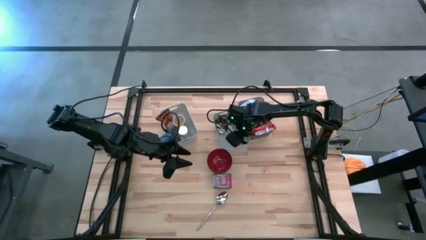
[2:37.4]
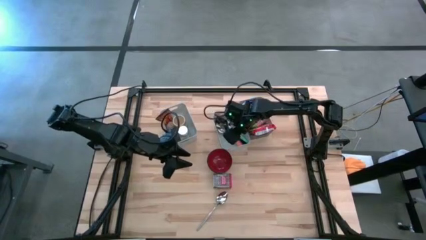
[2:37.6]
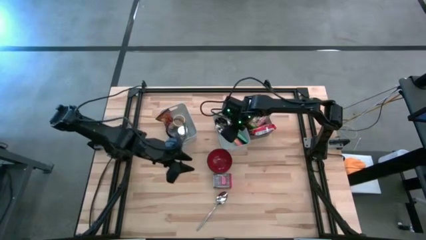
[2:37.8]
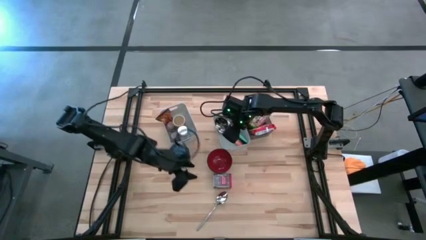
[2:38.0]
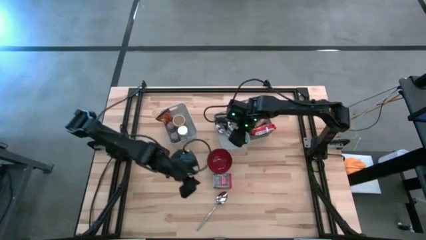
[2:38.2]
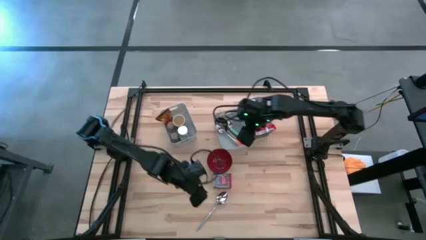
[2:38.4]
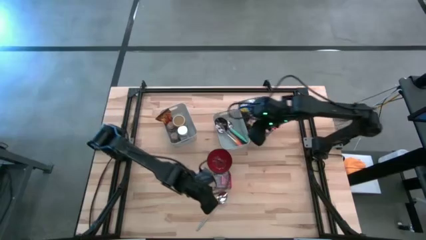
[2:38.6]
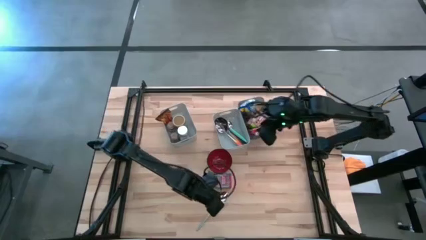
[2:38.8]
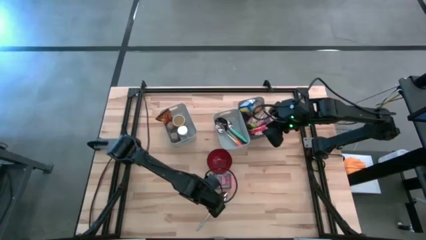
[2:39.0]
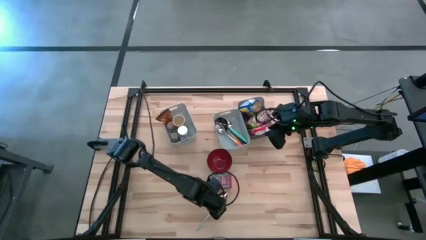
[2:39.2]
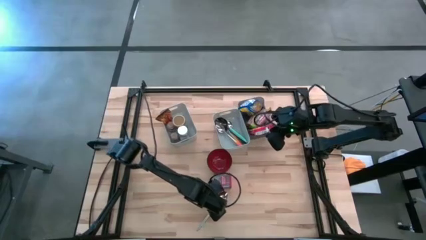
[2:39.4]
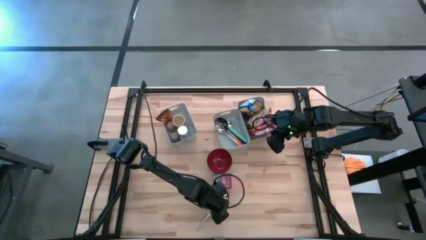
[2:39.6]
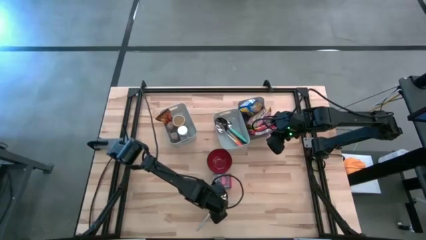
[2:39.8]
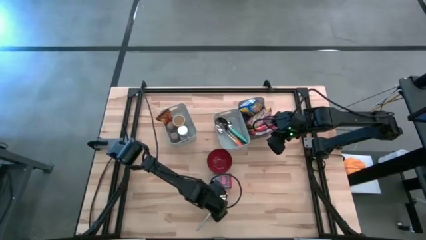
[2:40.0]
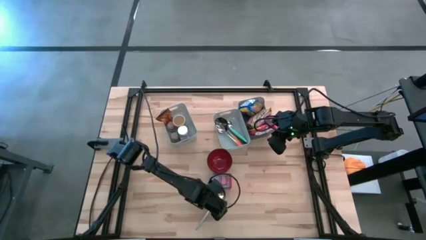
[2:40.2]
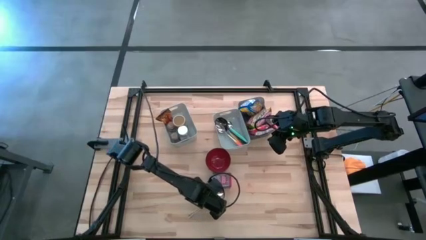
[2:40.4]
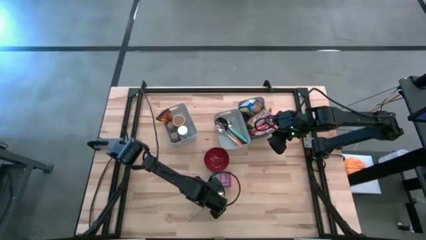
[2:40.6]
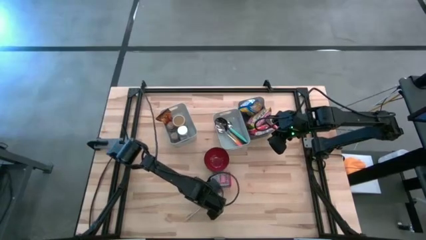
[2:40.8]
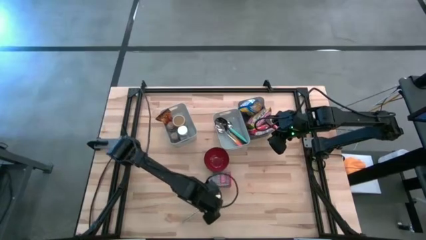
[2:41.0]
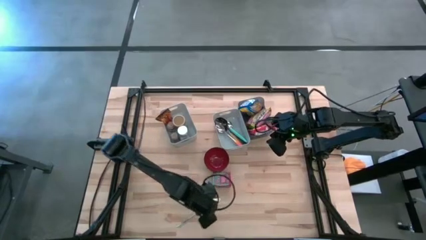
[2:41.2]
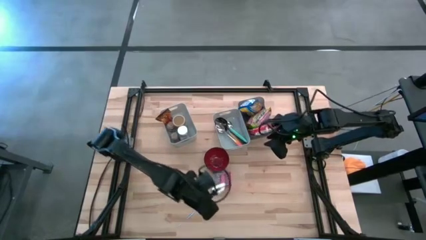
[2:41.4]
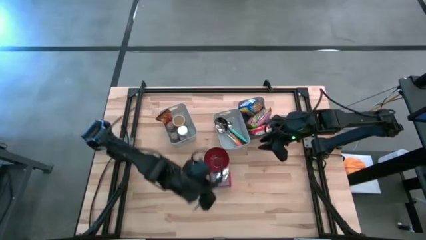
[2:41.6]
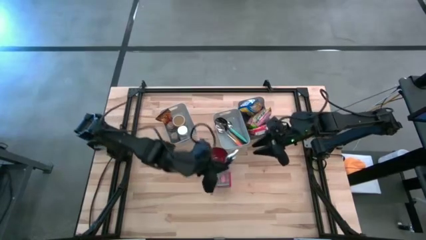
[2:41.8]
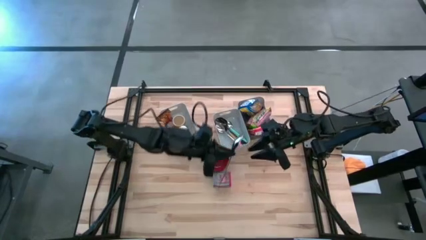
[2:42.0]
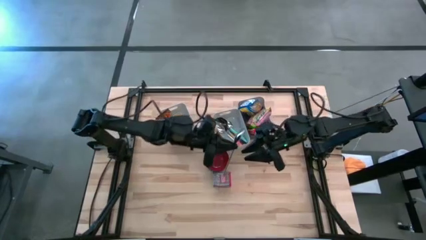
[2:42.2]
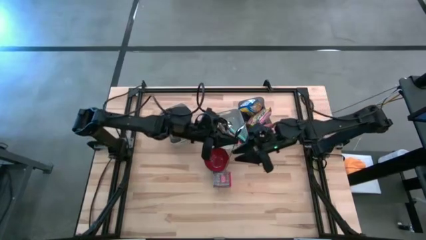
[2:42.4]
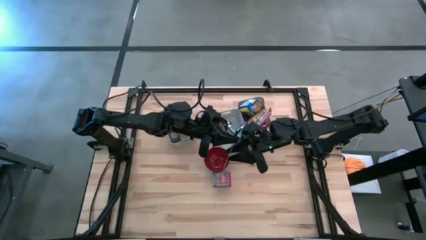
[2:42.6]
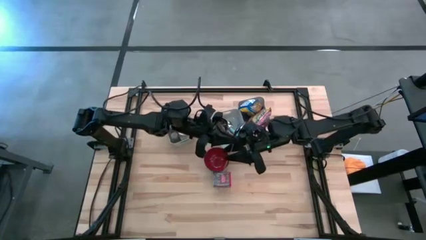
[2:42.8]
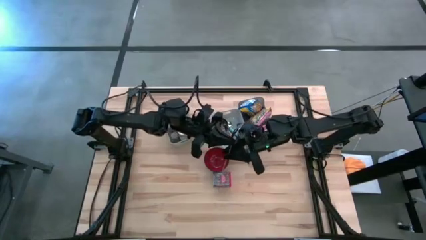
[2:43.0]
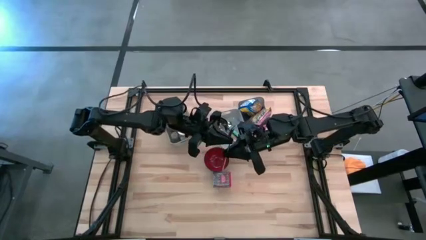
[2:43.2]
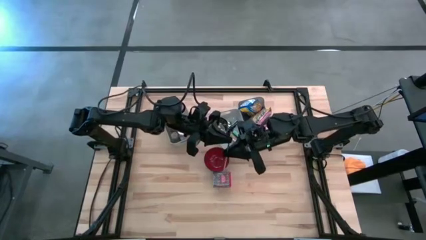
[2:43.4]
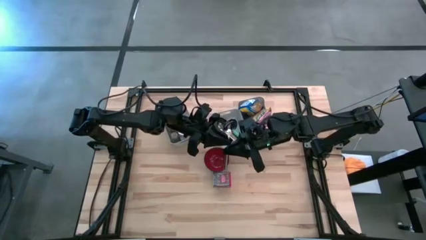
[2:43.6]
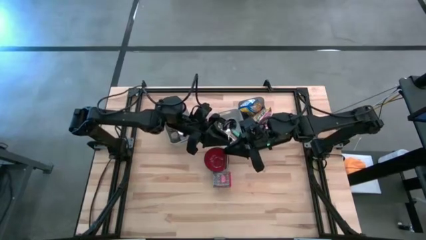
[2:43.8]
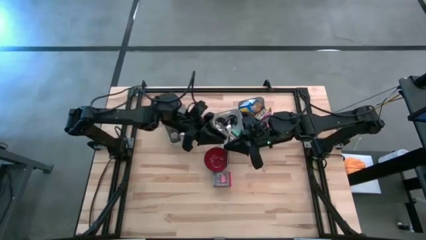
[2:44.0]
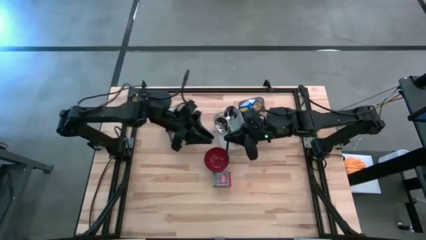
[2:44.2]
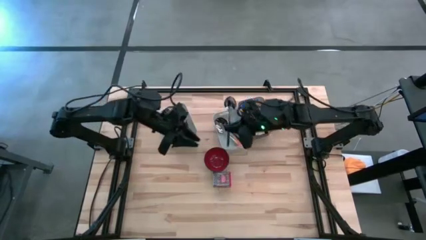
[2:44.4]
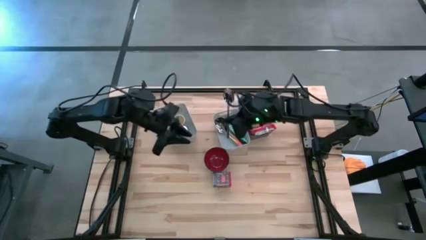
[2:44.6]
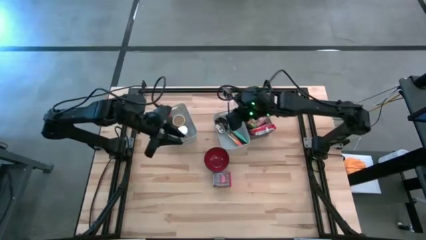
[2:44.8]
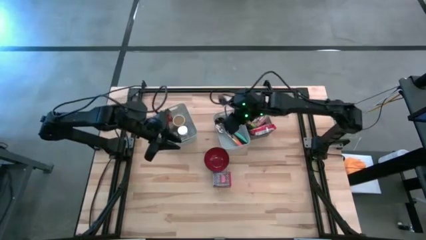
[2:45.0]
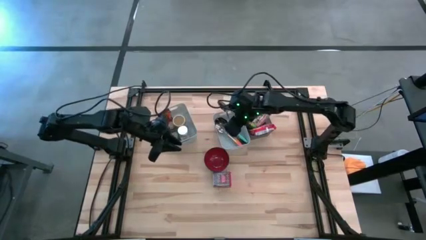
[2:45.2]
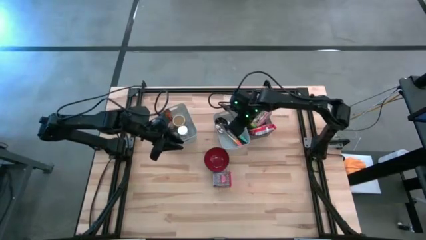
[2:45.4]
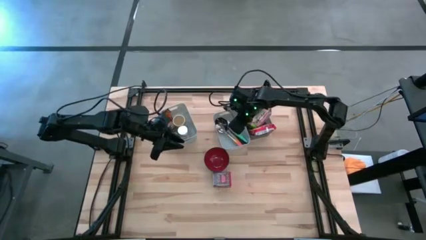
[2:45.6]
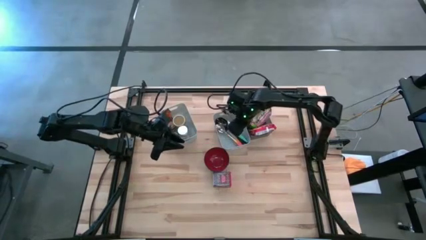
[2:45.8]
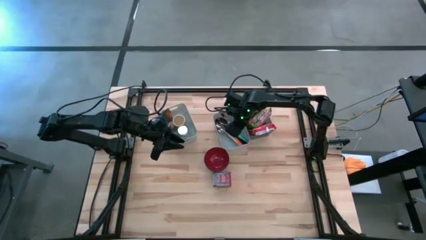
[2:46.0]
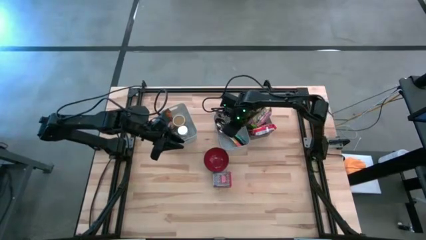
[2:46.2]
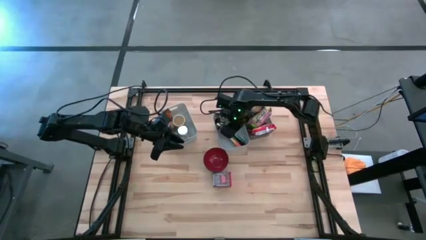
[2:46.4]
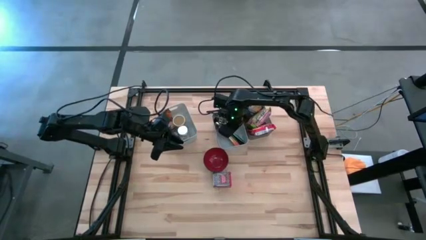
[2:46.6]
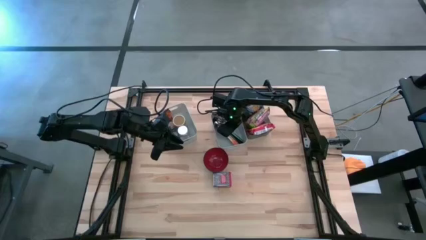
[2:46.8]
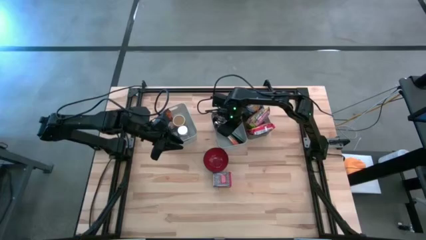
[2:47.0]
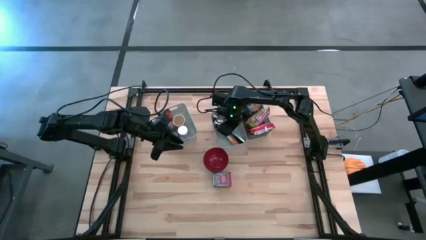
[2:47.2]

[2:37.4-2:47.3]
Put the silver spoon into the right white bin

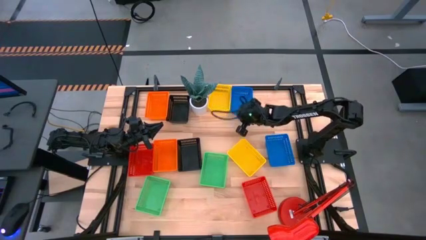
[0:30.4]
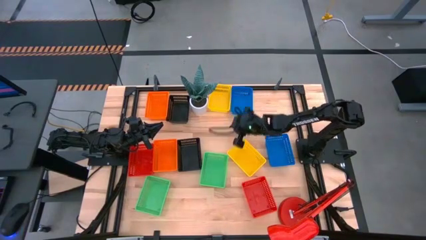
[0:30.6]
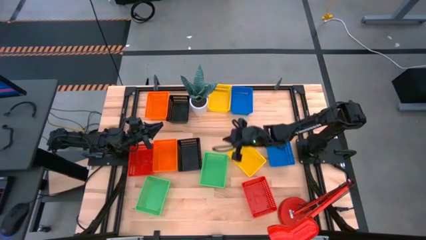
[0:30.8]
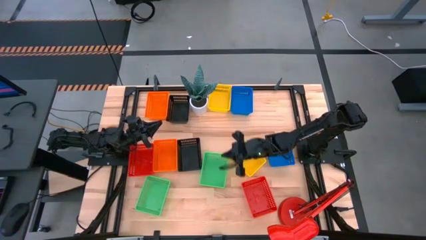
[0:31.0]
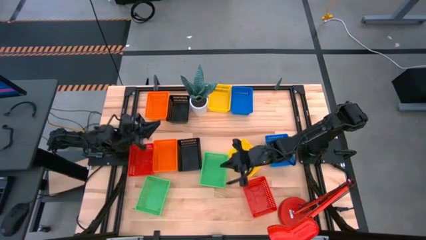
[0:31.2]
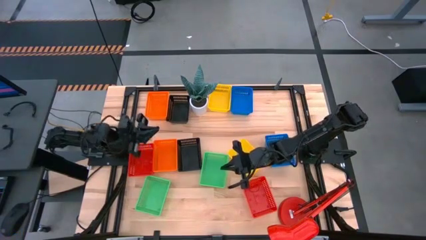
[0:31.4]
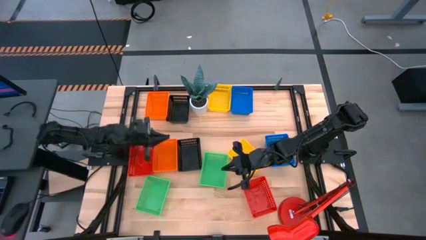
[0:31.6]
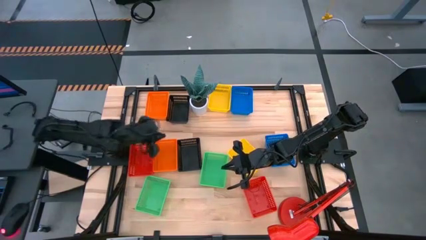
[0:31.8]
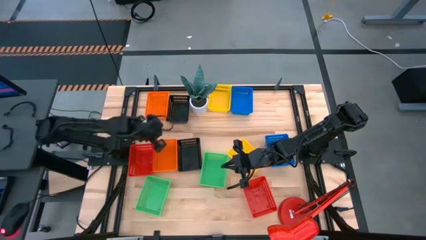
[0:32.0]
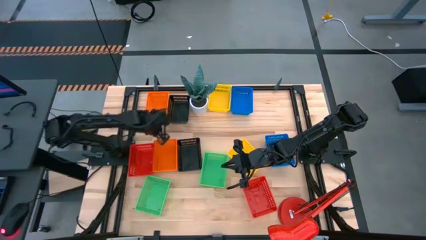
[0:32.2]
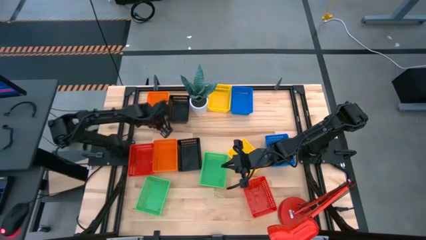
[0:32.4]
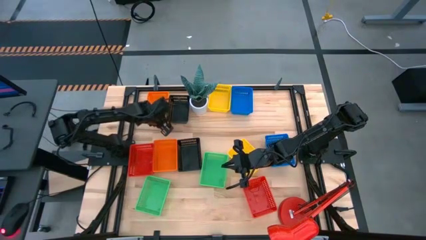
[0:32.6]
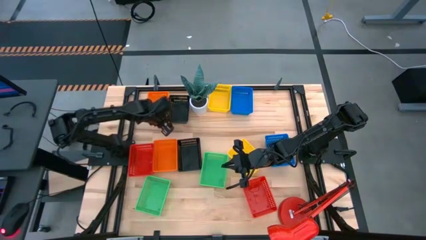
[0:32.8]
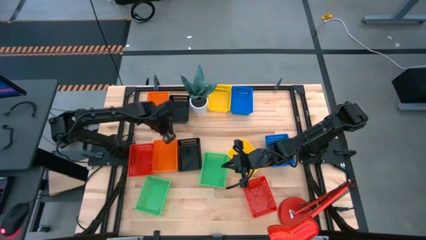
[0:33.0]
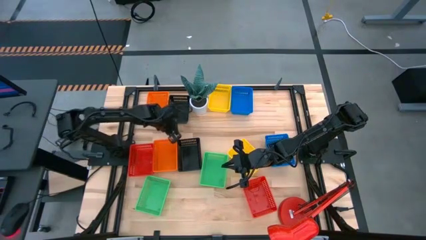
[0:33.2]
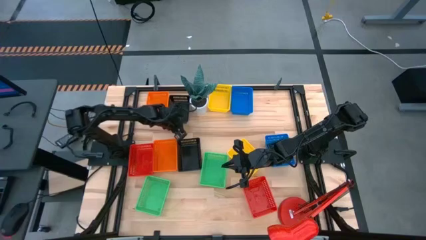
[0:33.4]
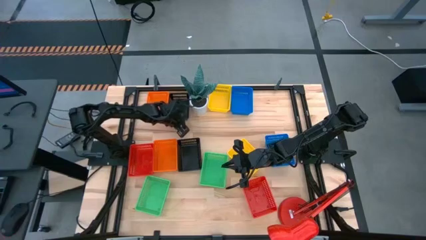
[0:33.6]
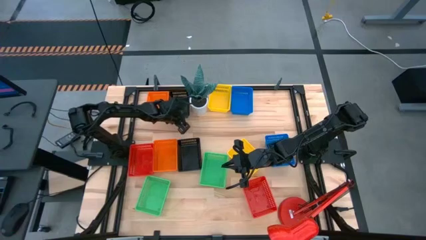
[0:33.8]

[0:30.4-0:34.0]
Adjust the top black bin
